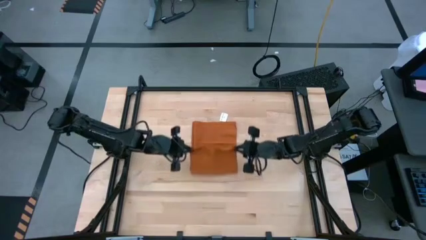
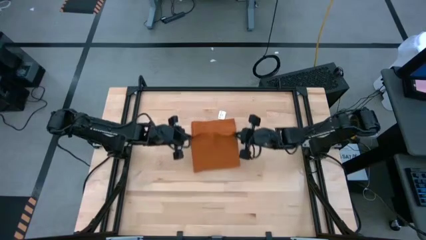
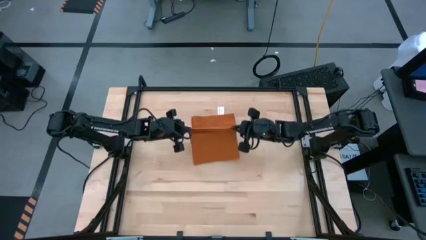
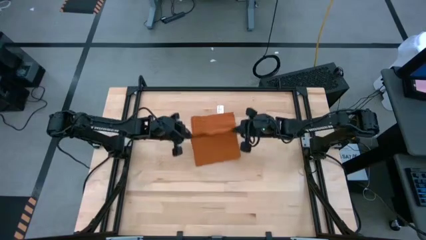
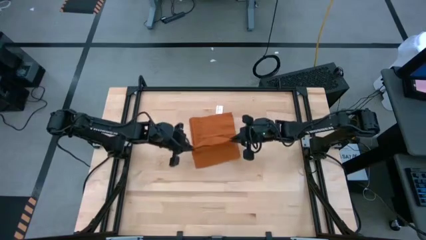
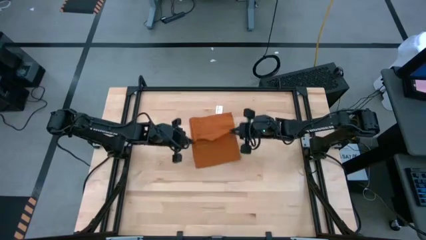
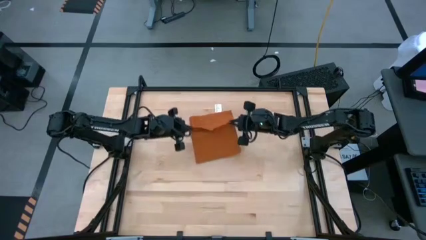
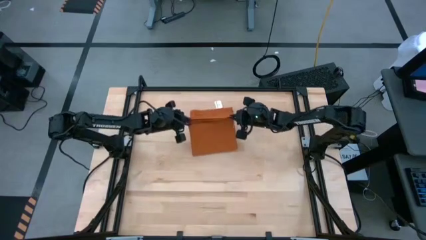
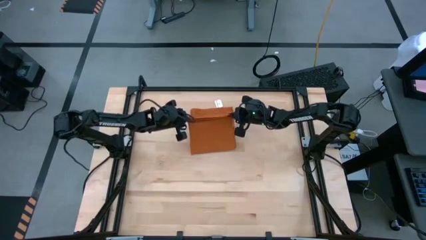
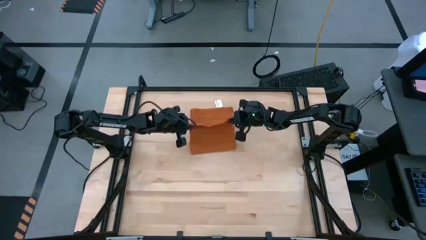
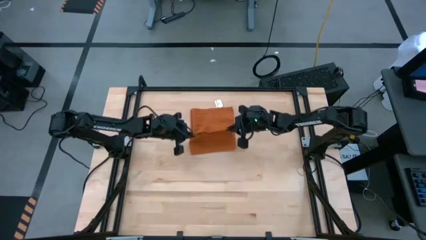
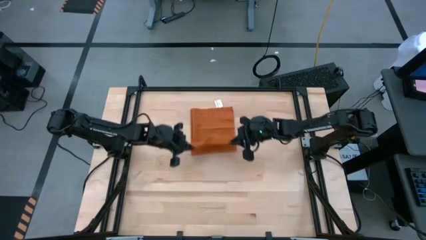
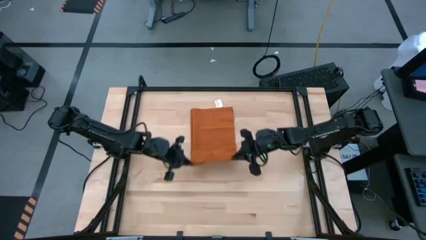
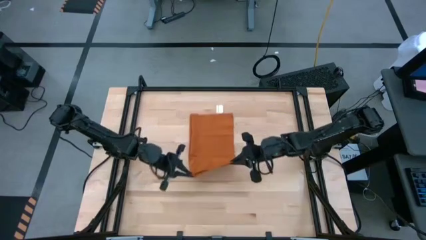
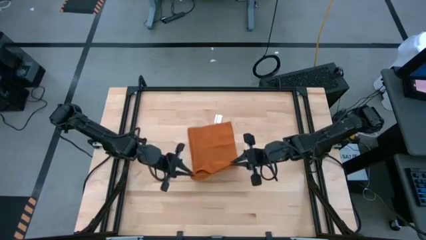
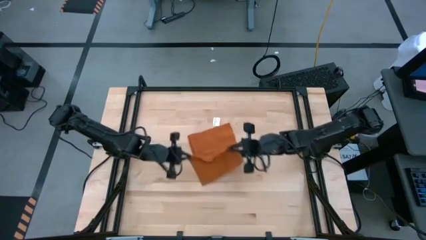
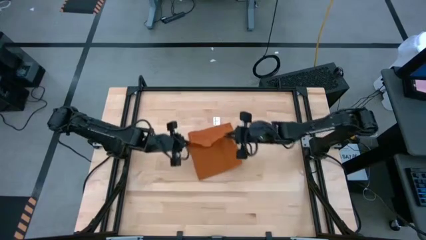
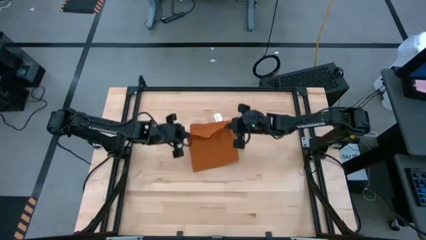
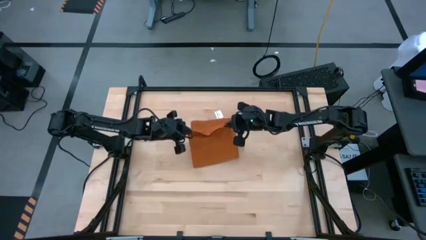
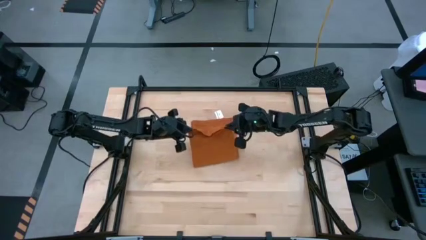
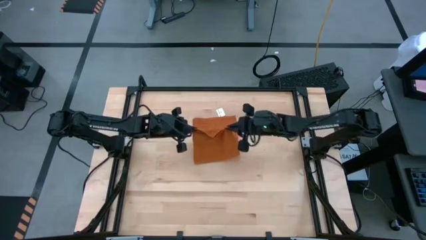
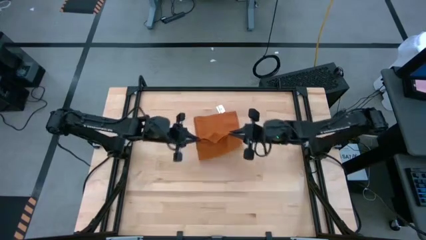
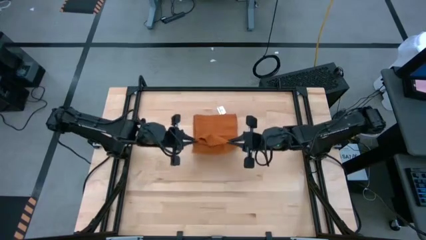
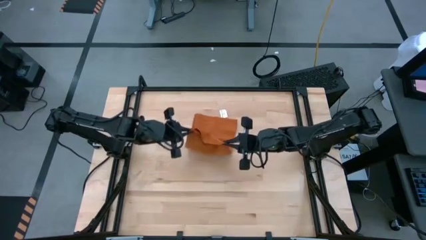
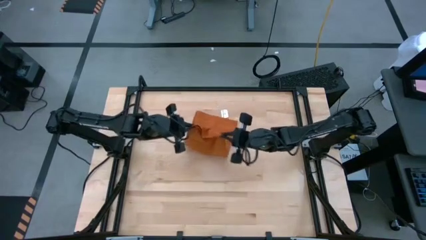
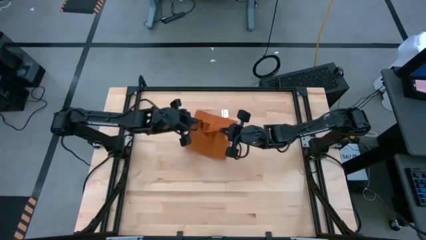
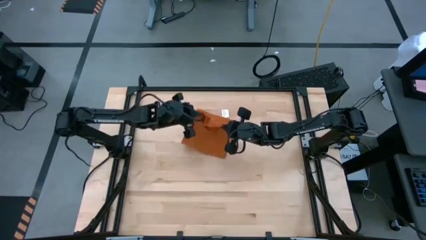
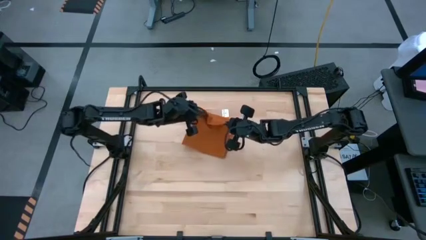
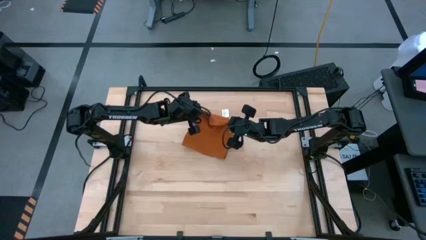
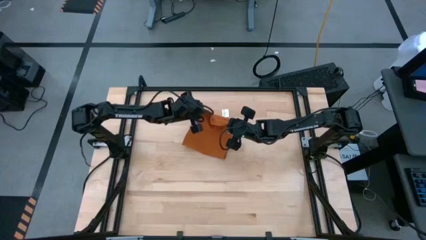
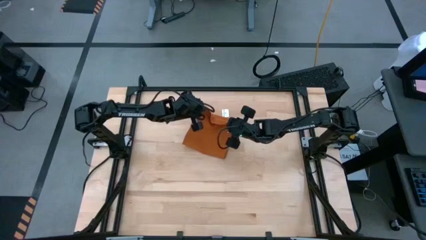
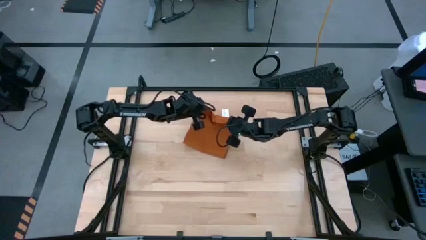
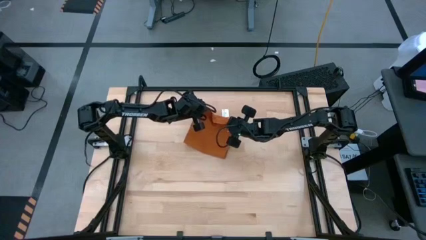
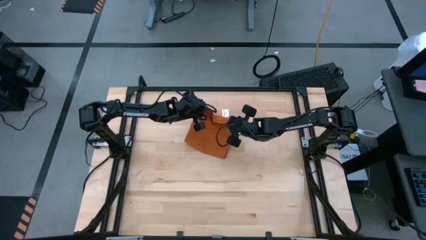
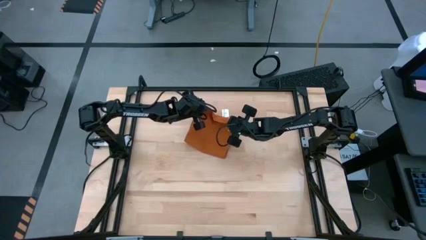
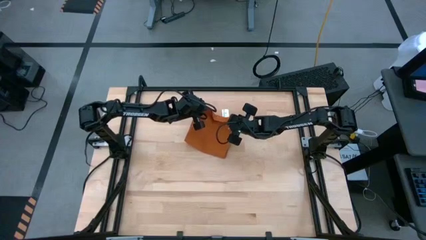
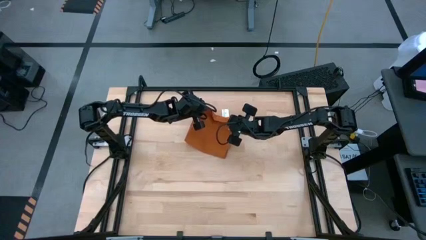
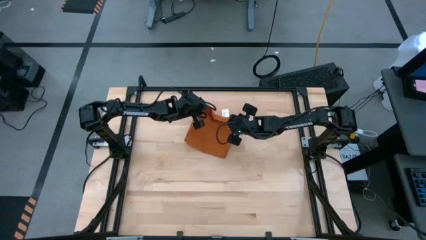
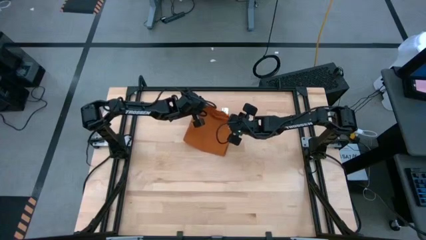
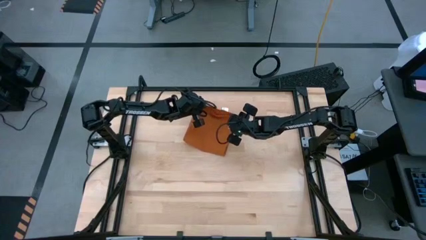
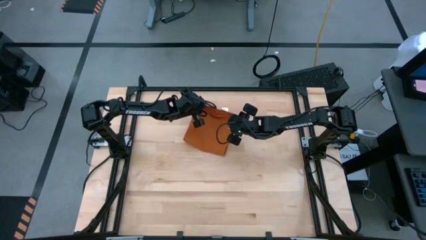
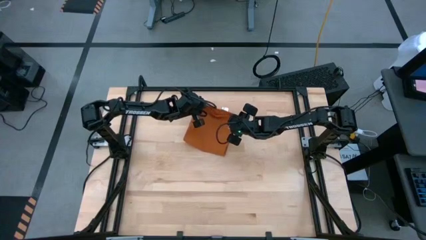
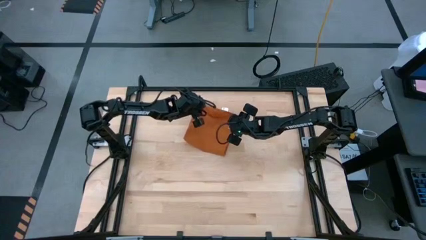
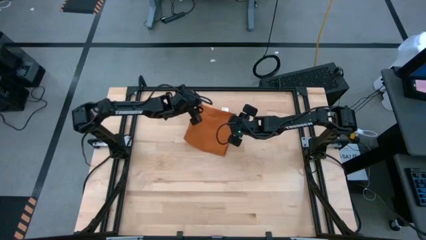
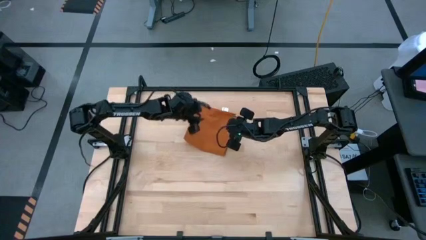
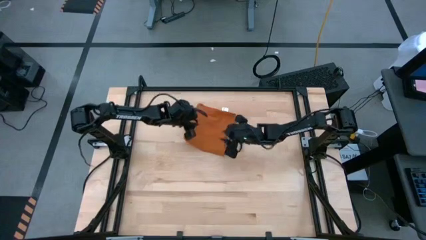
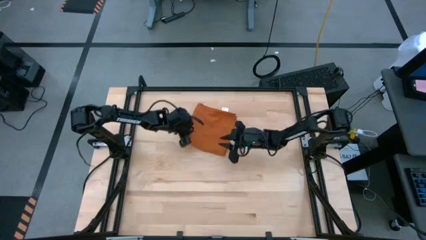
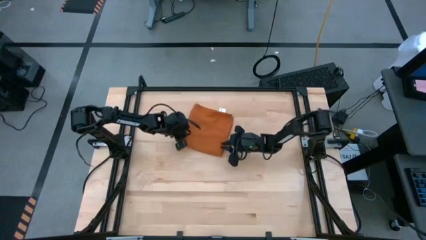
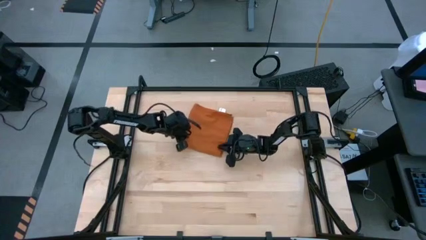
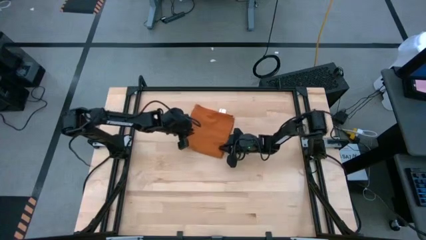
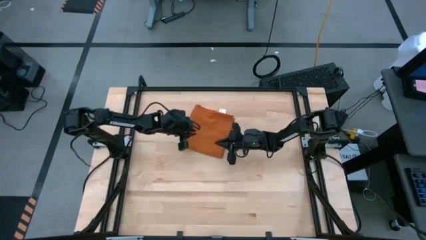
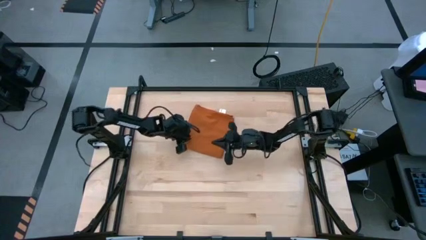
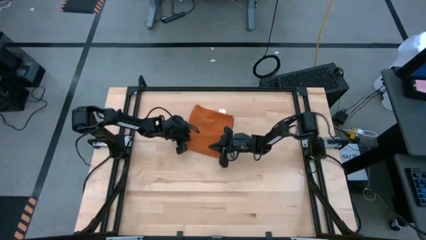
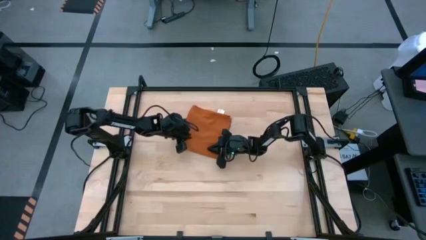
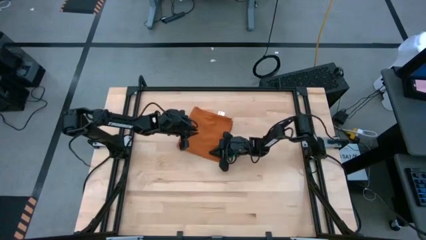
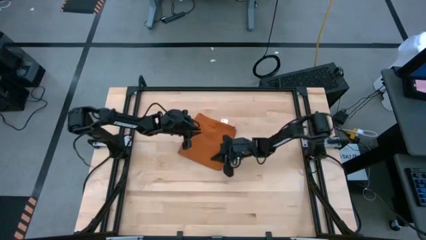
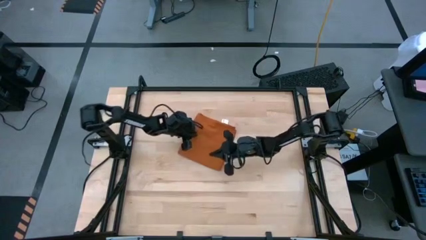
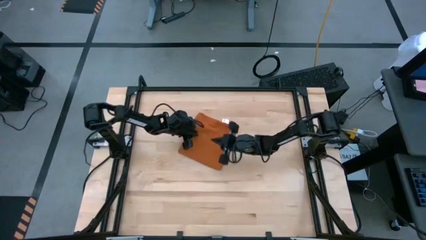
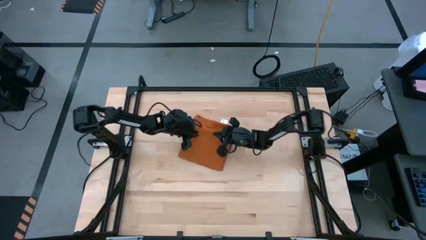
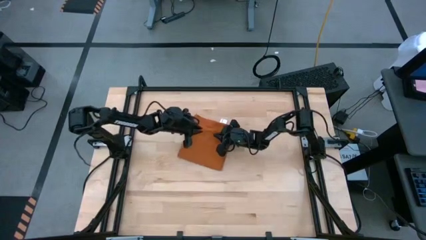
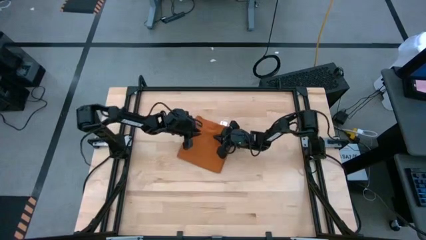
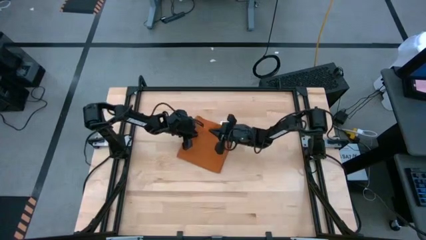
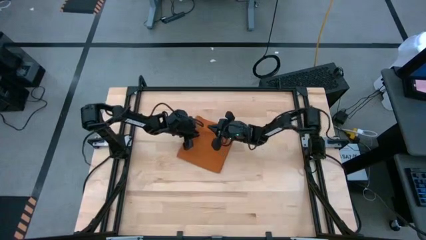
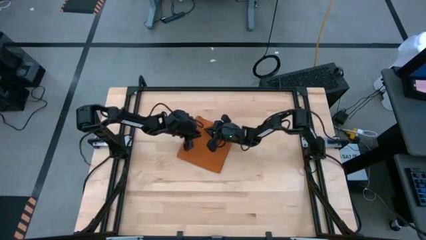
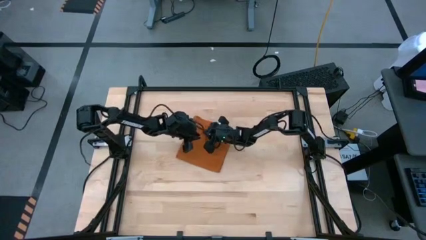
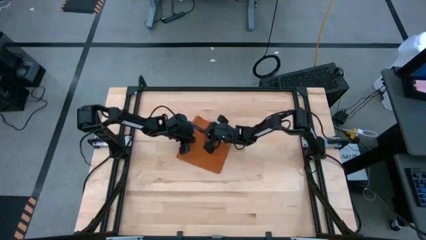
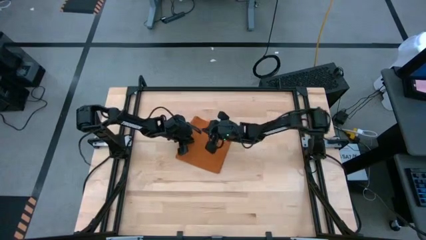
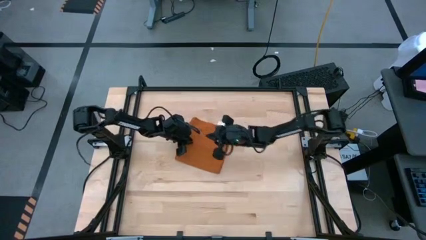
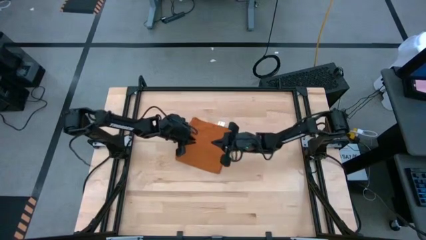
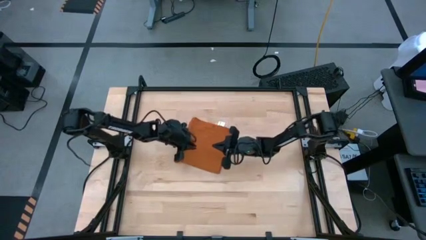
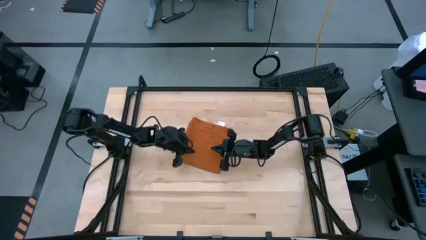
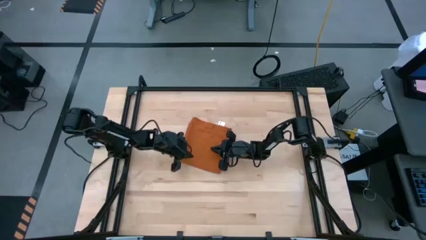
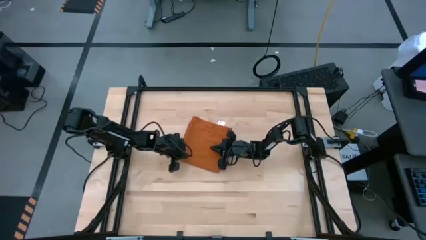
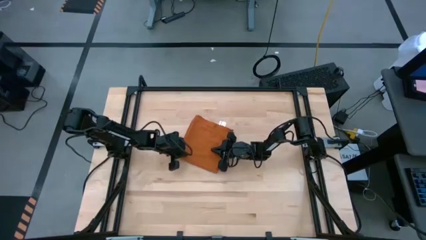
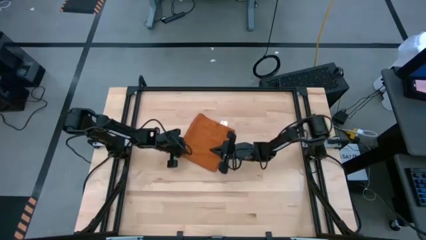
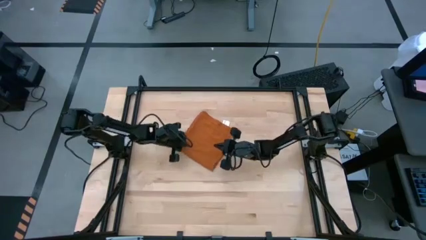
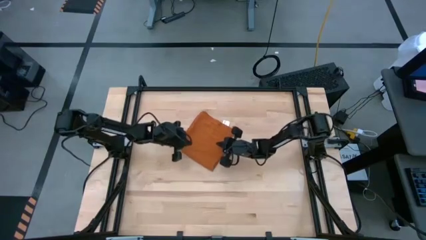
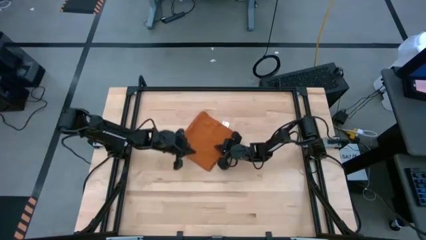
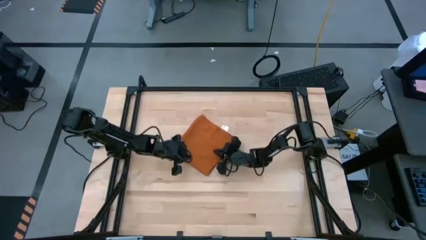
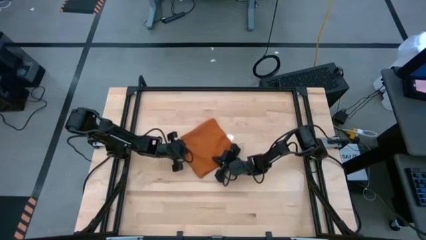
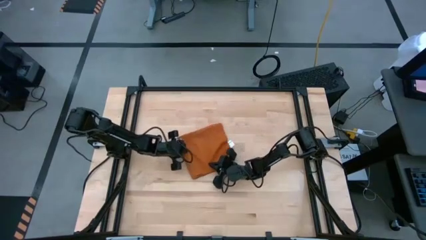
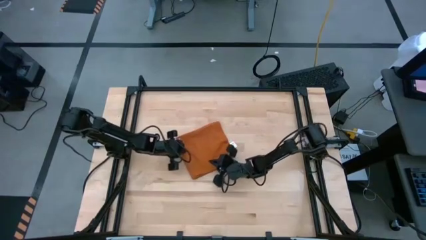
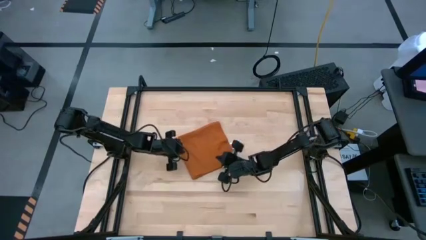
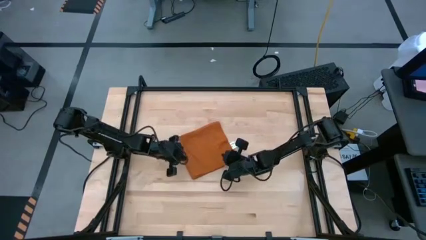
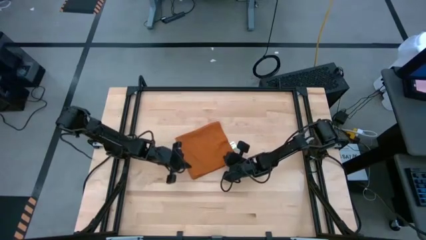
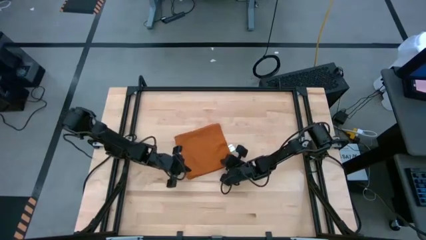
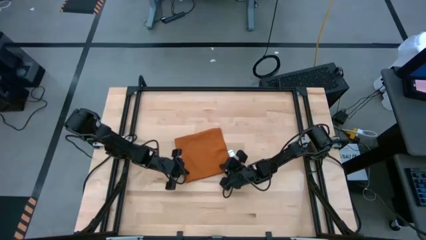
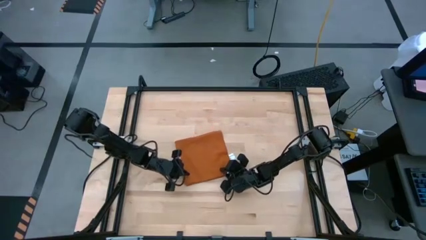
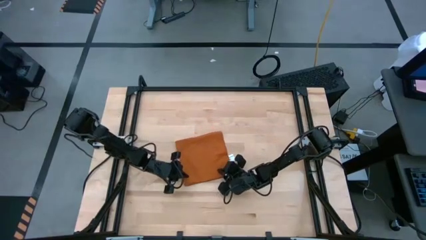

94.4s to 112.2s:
Task: Roll towel
Roll the brown towel
